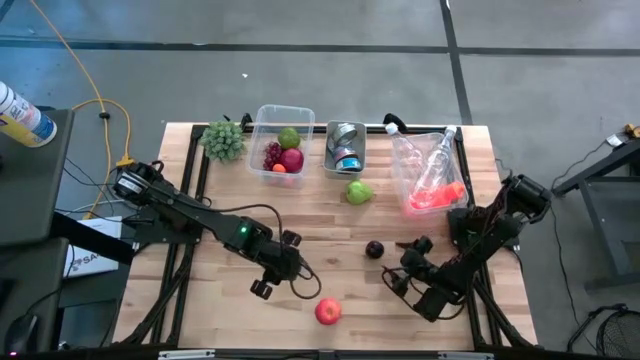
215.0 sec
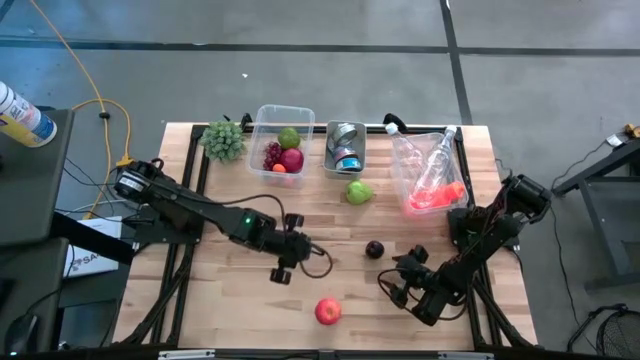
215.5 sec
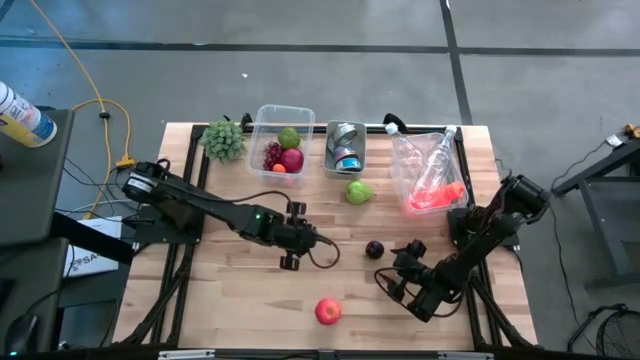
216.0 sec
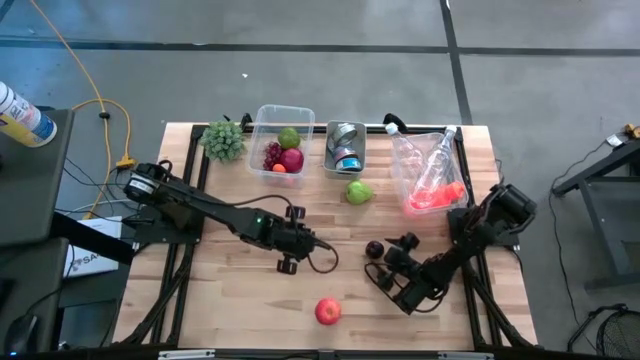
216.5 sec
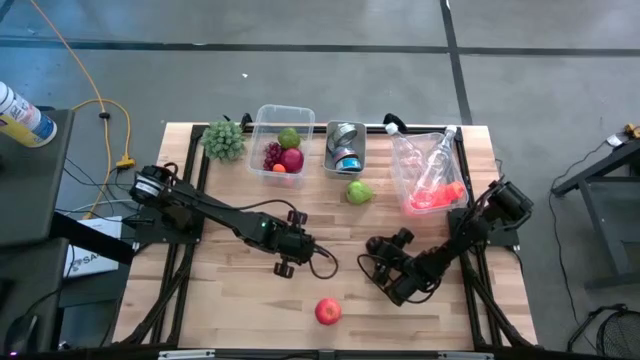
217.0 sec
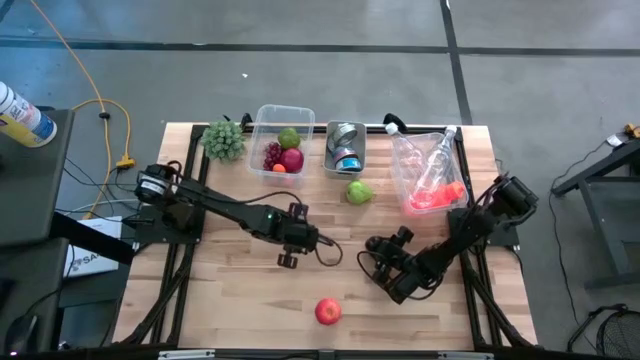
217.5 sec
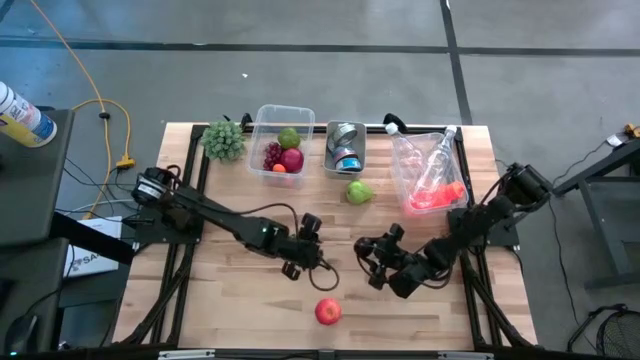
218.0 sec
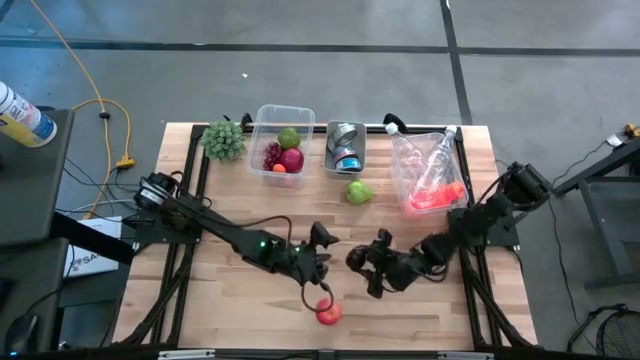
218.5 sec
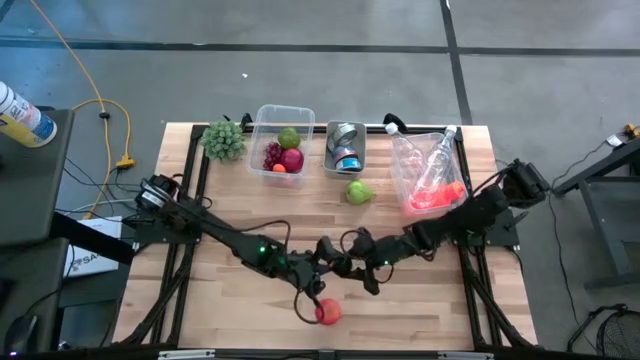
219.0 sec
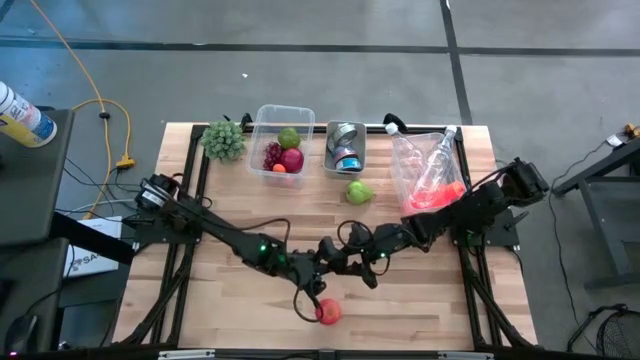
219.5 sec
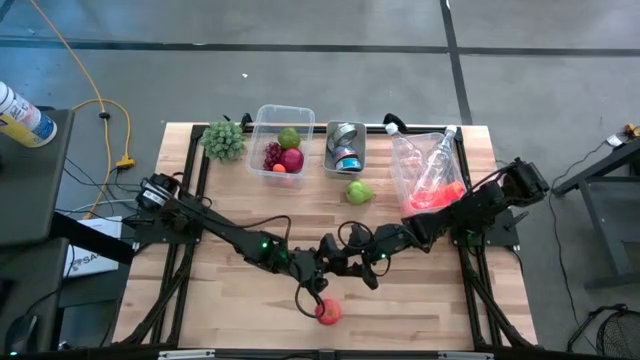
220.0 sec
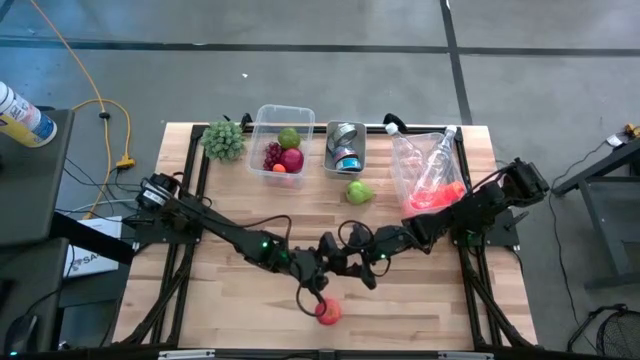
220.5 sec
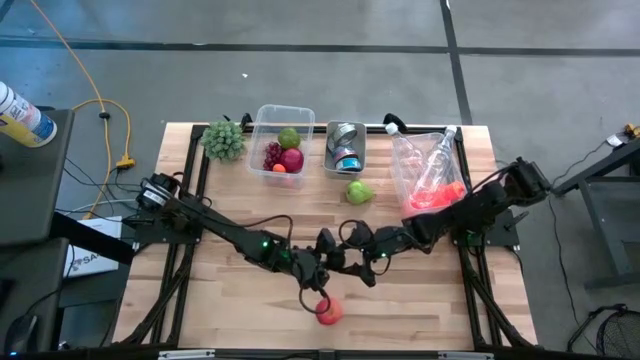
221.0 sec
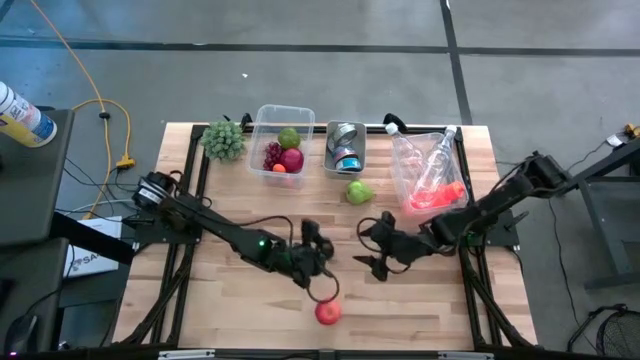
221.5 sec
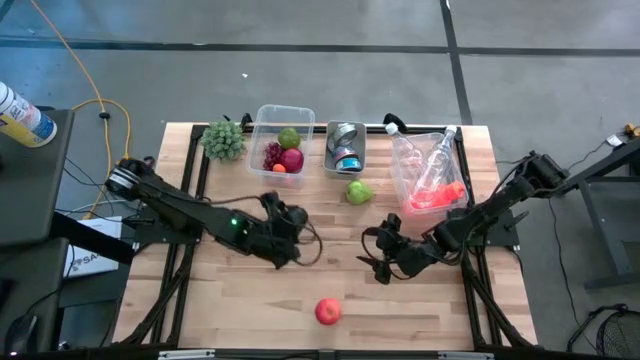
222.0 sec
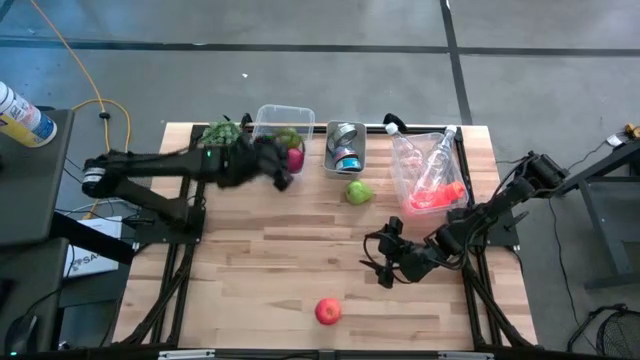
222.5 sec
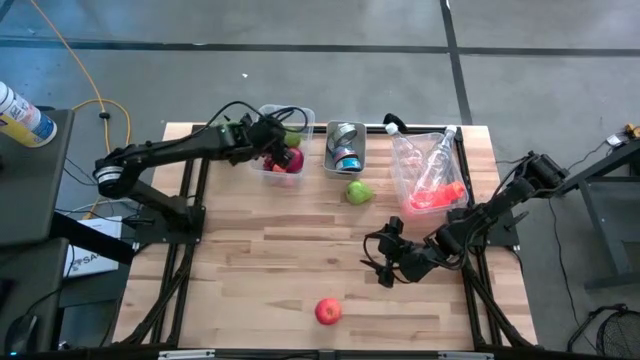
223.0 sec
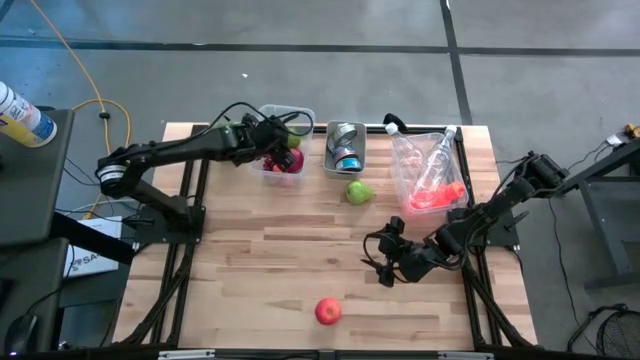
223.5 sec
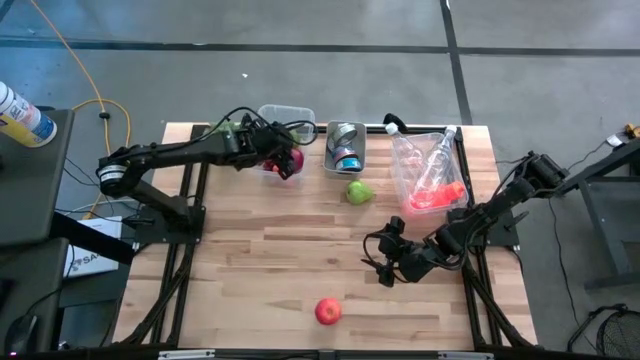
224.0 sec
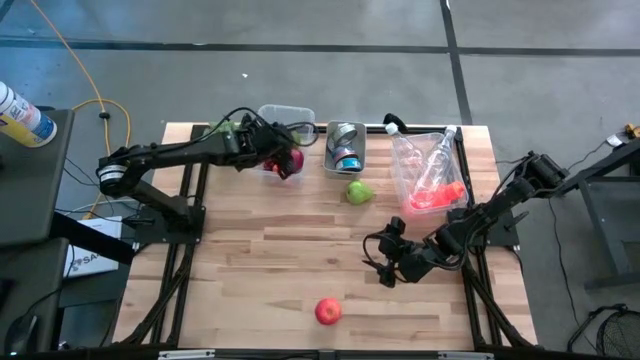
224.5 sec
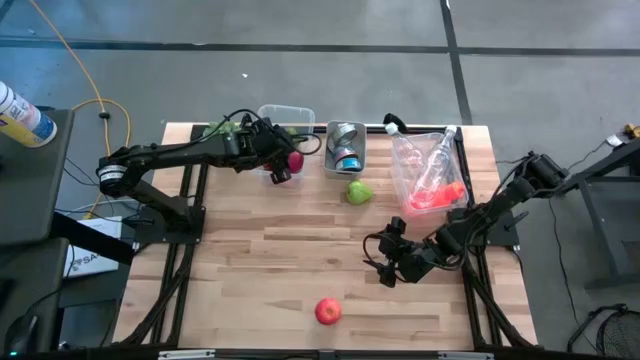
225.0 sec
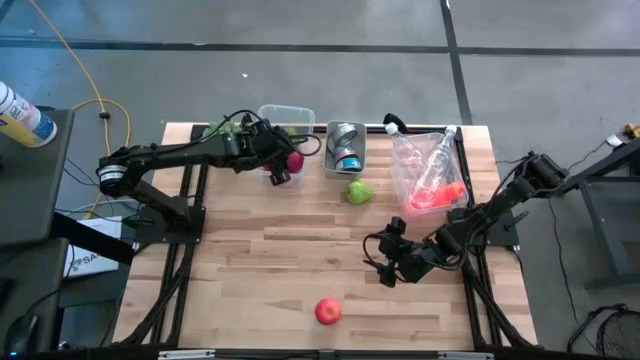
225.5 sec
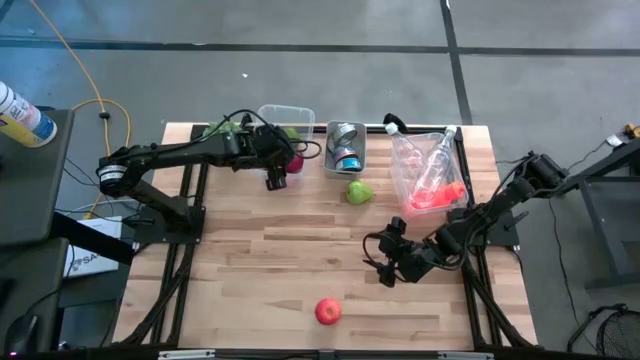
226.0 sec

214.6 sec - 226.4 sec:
Task: Pick & Place Food Item
Put the black plum into the left transparent bin

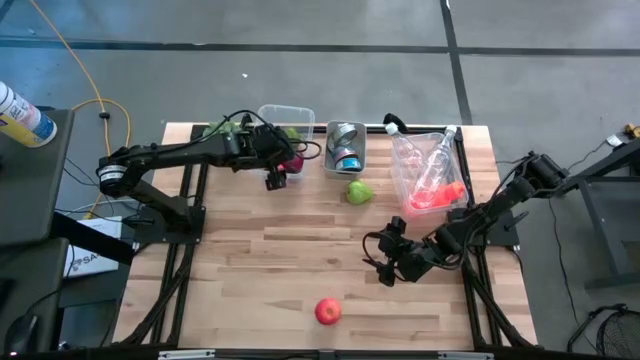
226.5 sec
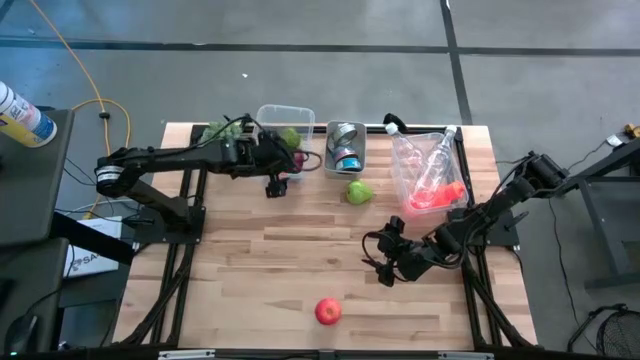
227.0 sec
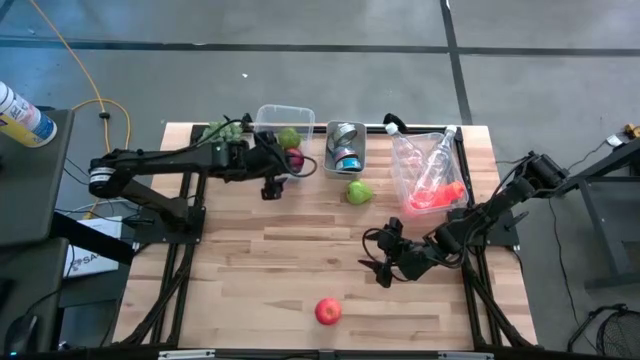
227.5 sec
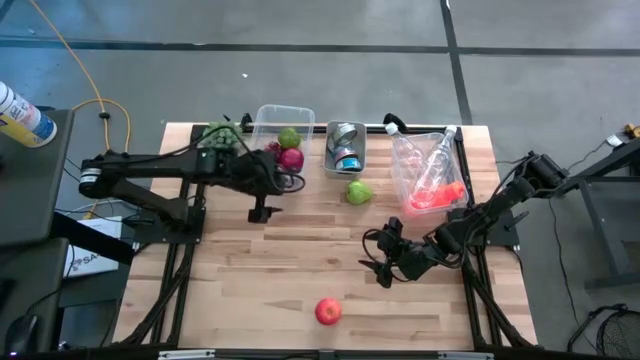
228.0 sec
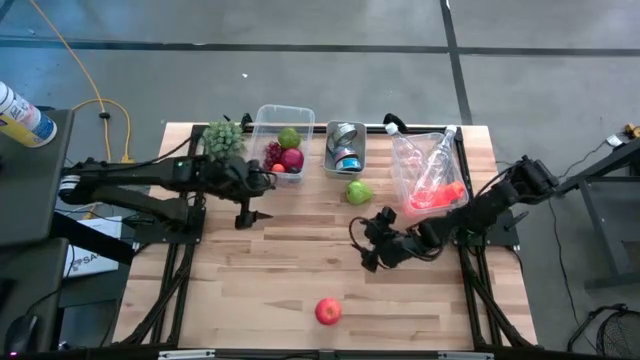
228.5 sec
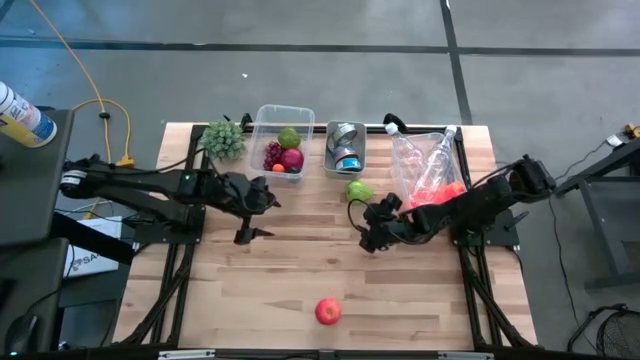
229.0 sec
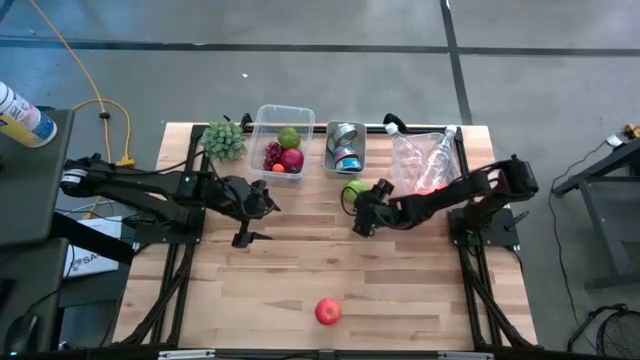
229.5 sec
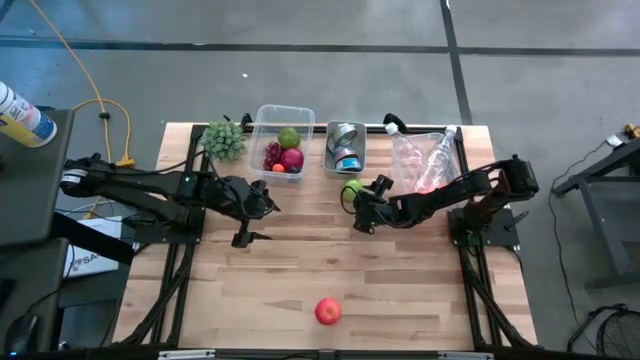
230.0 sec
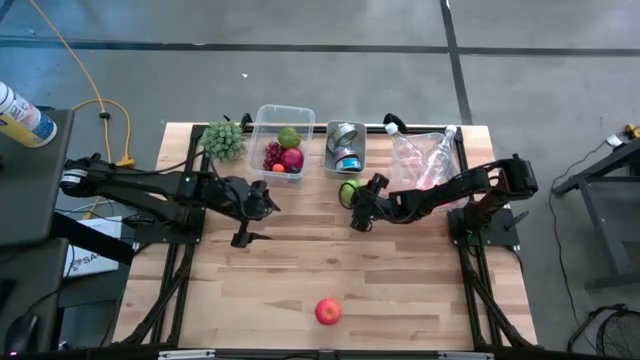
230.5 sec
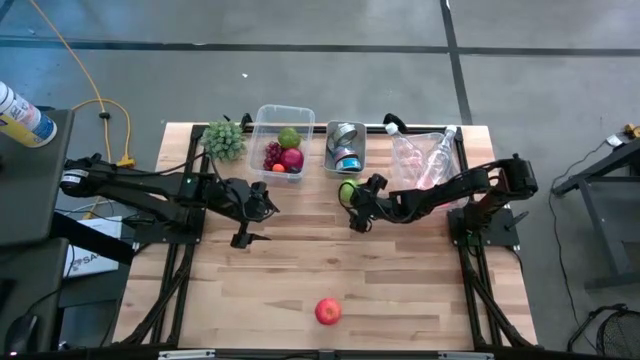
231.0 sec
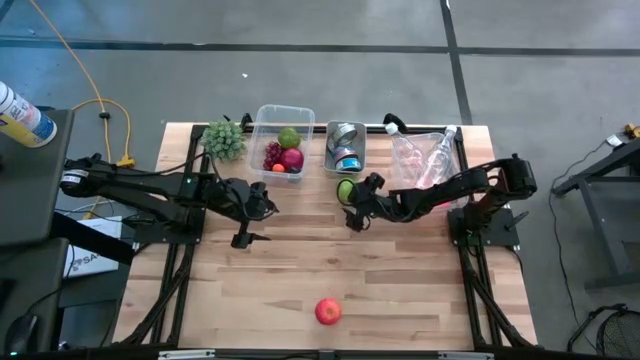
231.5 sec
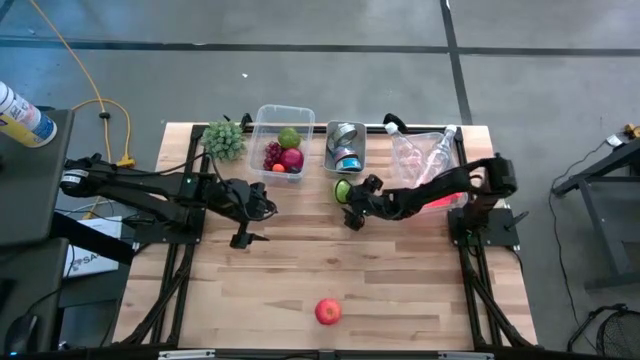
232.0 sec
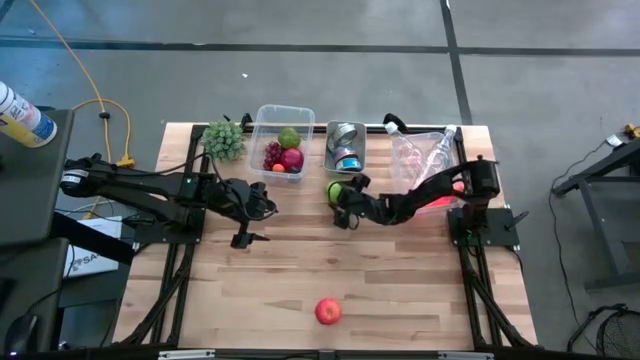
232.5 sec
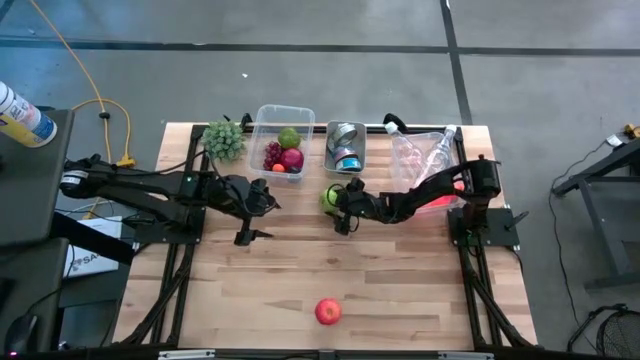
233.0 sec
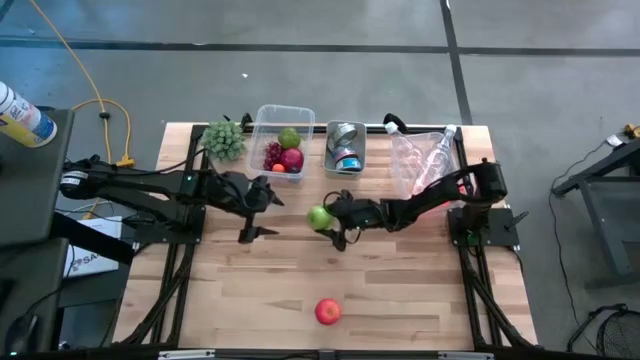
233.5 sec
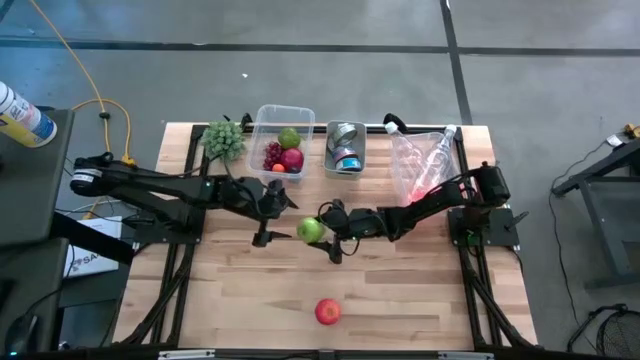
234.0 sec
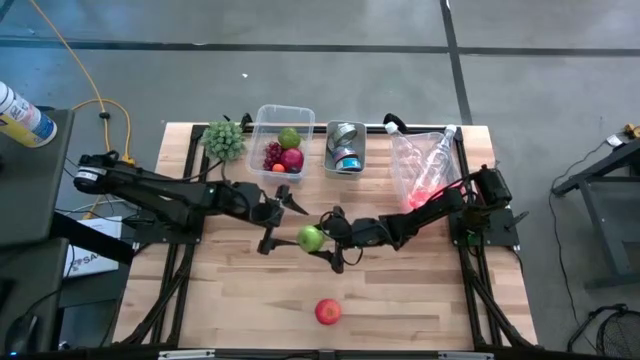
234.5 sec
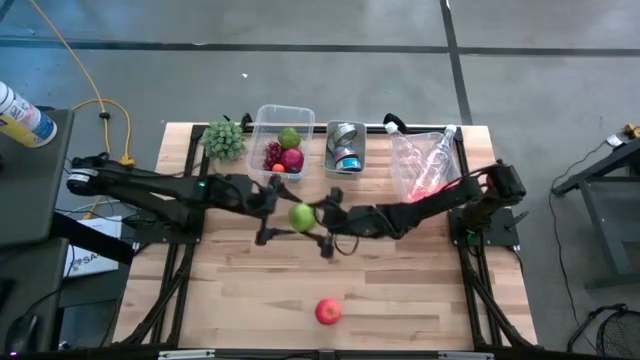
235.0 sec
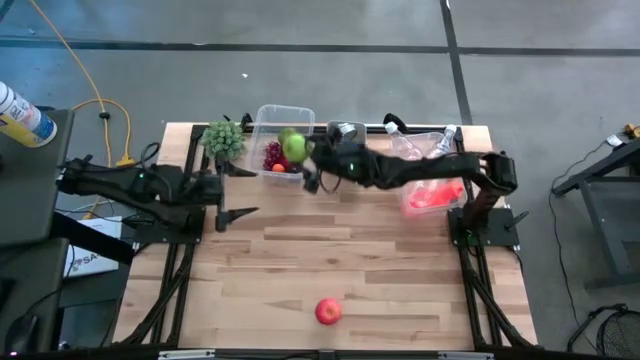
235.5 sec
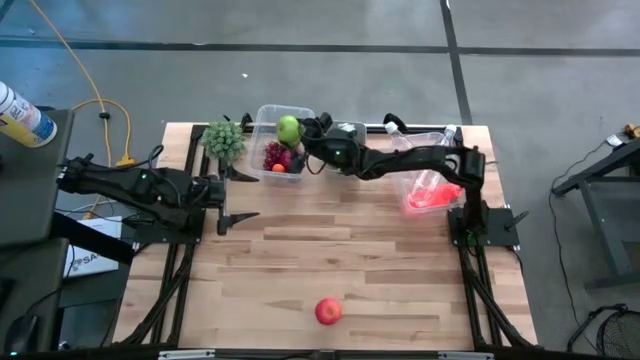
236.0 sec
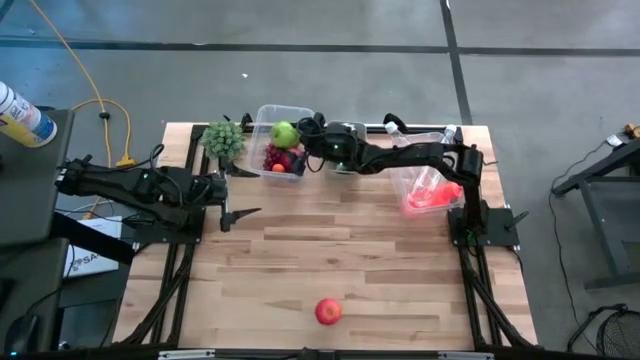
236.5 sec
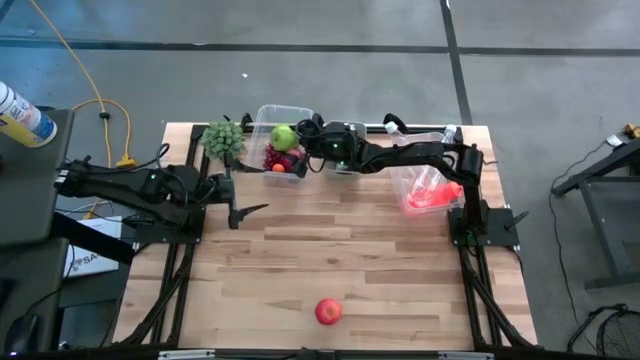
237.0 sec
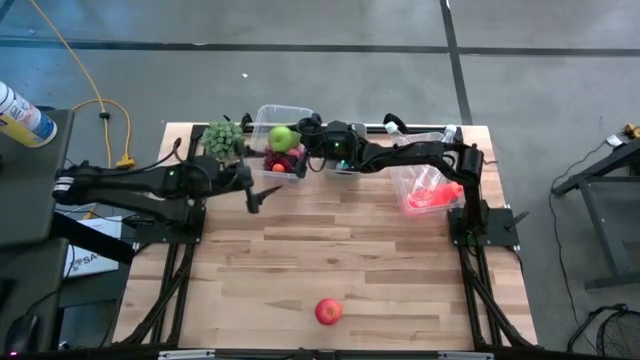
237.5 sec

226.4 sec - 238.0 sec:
Put the green pear into the left transparent bin
